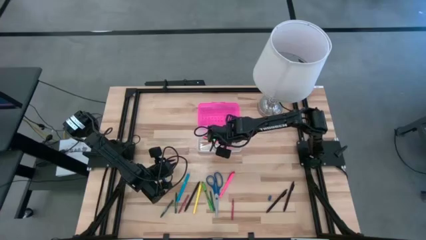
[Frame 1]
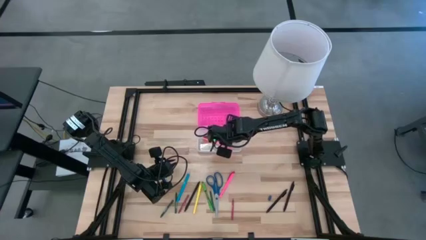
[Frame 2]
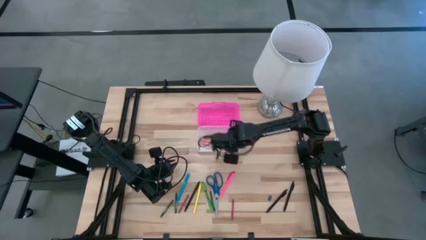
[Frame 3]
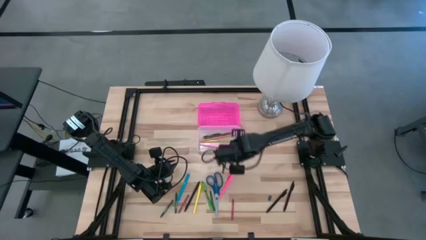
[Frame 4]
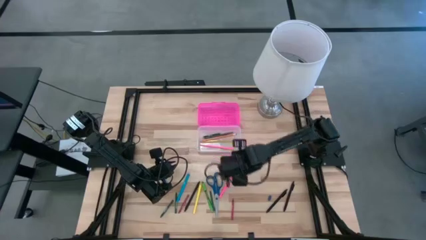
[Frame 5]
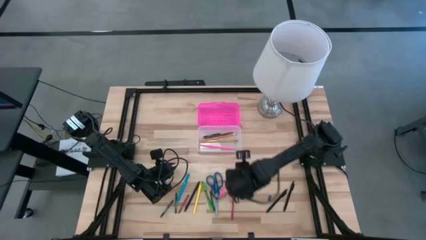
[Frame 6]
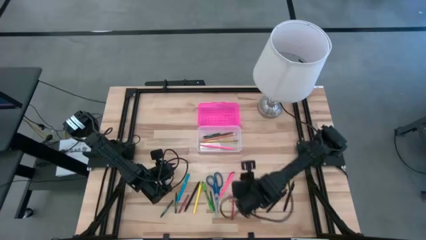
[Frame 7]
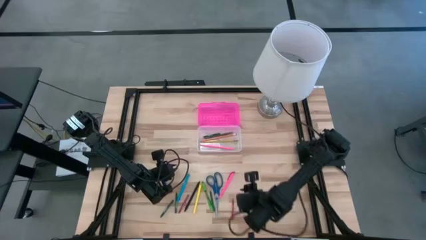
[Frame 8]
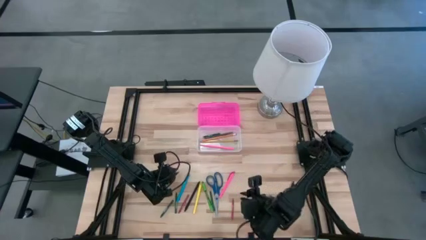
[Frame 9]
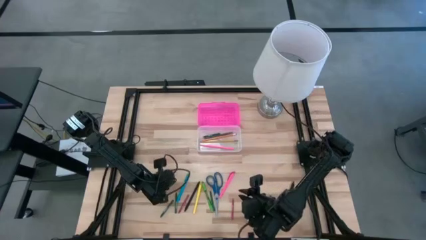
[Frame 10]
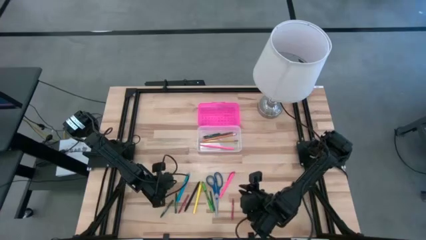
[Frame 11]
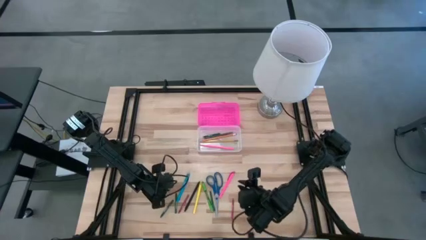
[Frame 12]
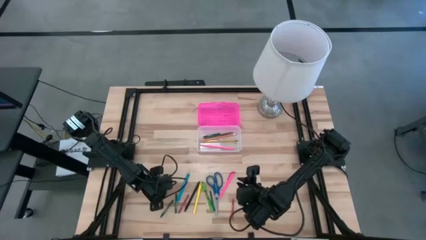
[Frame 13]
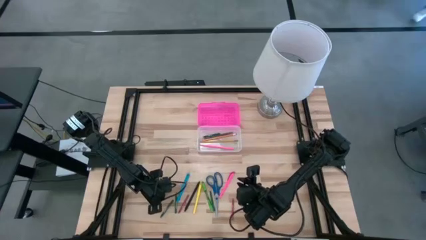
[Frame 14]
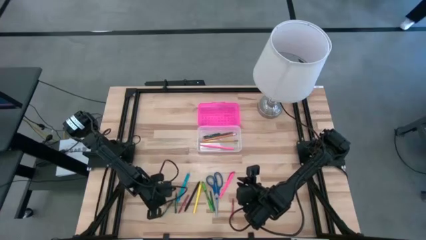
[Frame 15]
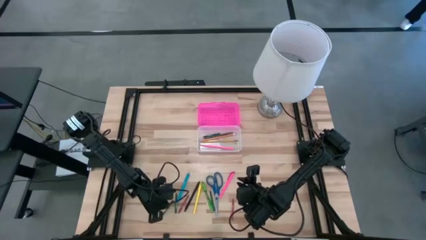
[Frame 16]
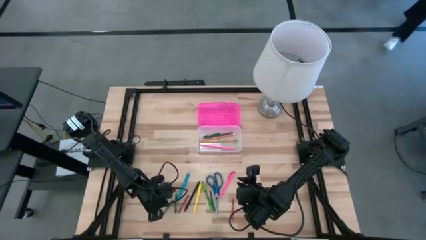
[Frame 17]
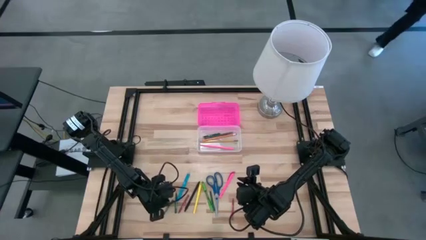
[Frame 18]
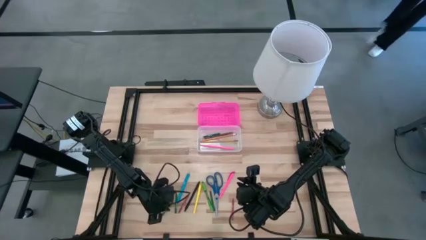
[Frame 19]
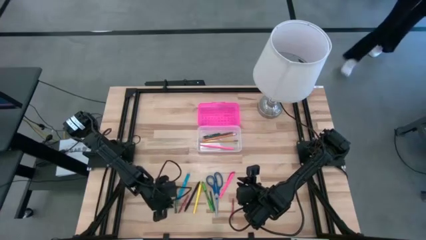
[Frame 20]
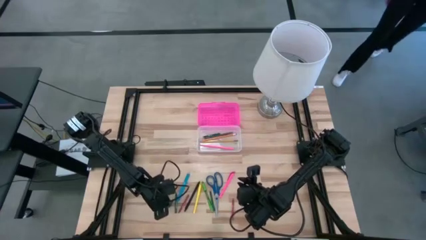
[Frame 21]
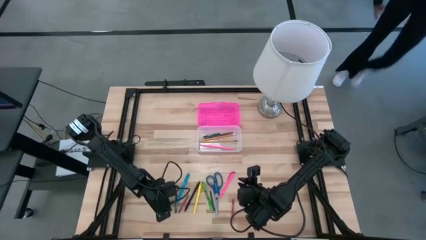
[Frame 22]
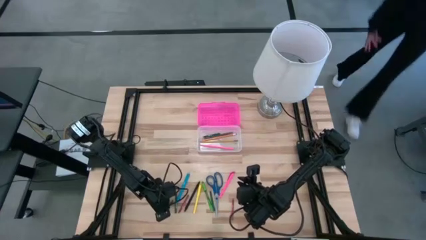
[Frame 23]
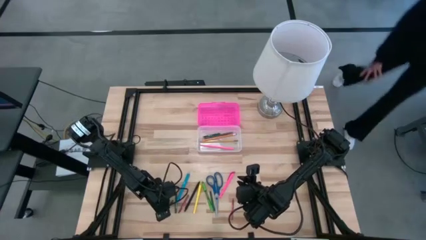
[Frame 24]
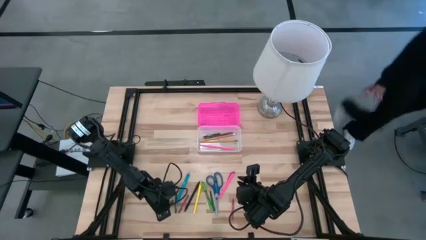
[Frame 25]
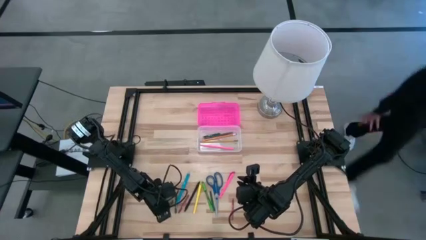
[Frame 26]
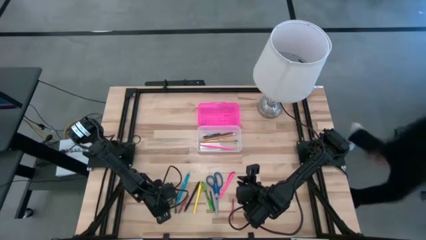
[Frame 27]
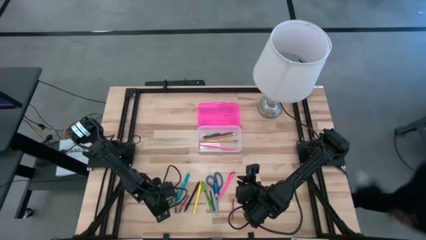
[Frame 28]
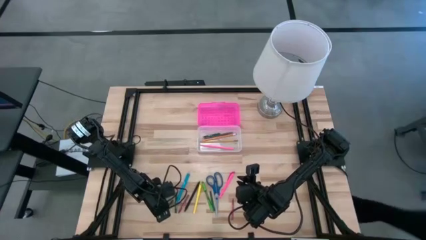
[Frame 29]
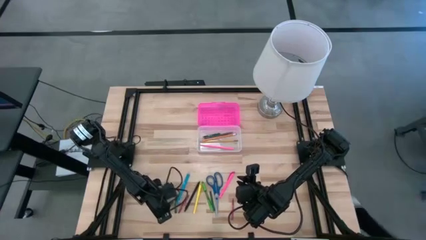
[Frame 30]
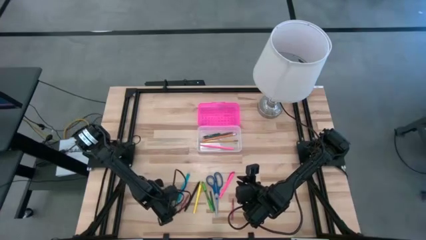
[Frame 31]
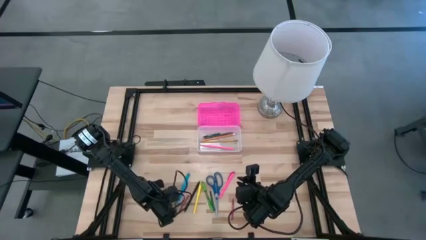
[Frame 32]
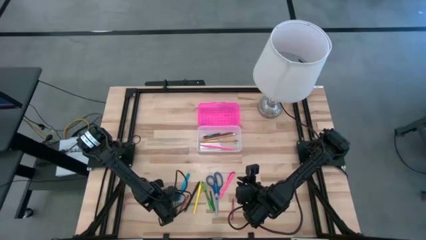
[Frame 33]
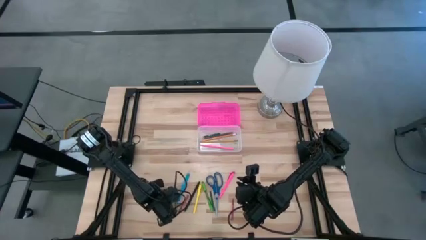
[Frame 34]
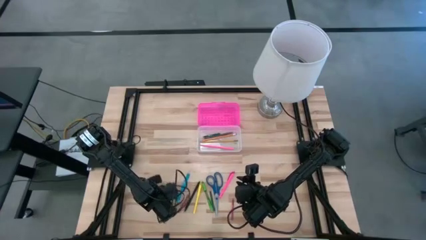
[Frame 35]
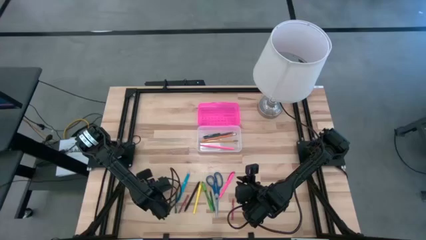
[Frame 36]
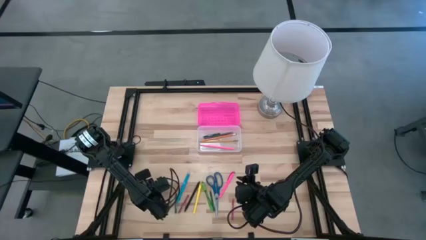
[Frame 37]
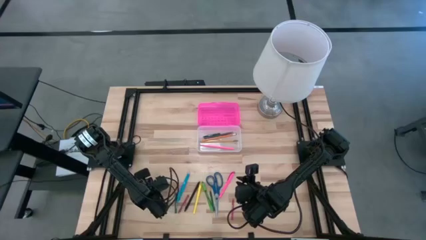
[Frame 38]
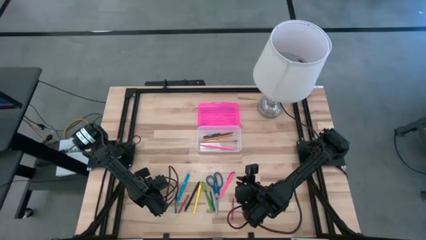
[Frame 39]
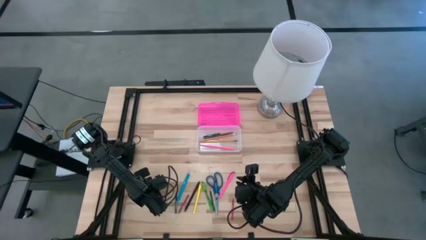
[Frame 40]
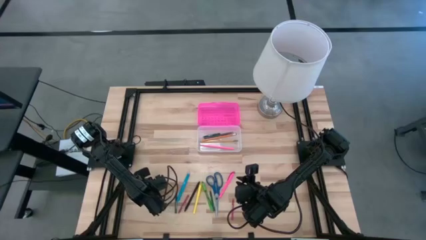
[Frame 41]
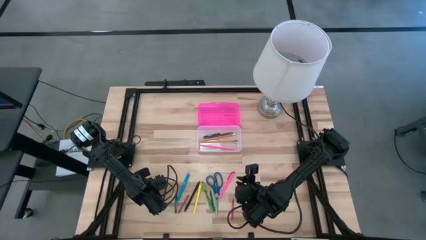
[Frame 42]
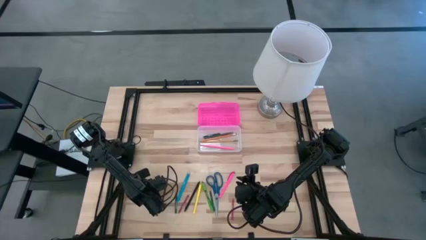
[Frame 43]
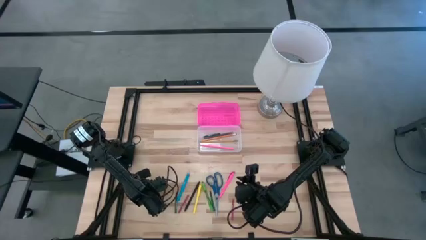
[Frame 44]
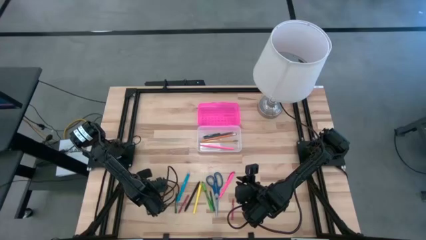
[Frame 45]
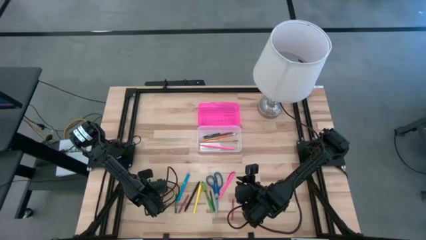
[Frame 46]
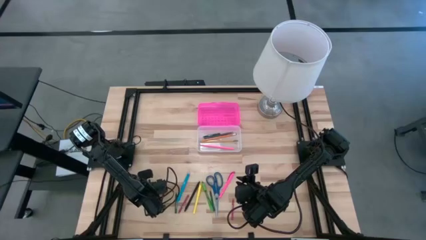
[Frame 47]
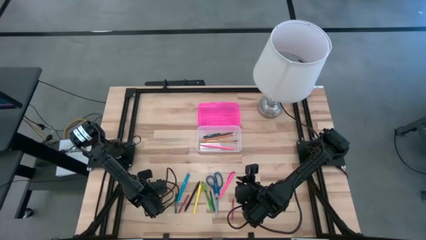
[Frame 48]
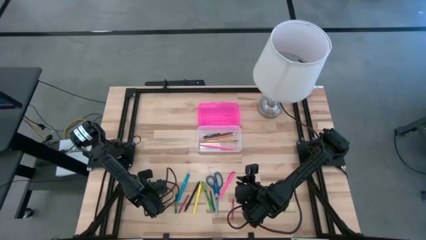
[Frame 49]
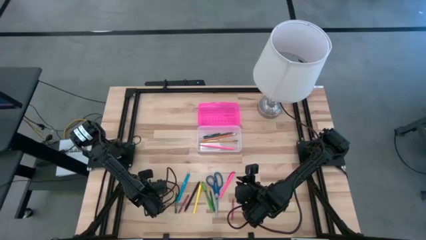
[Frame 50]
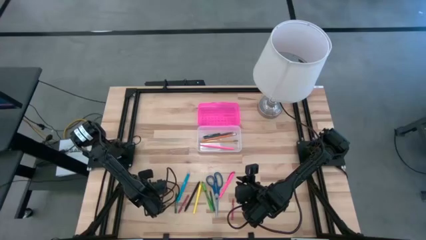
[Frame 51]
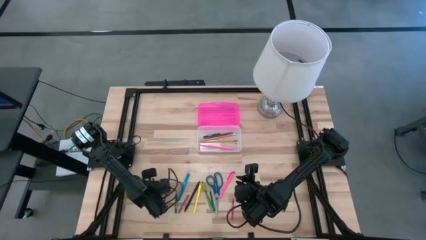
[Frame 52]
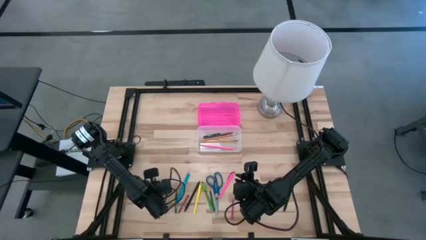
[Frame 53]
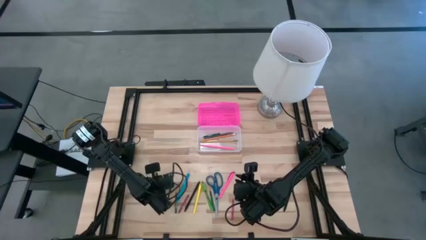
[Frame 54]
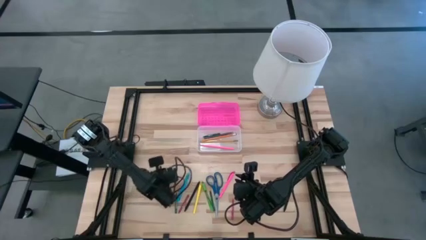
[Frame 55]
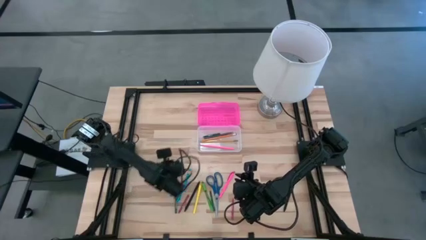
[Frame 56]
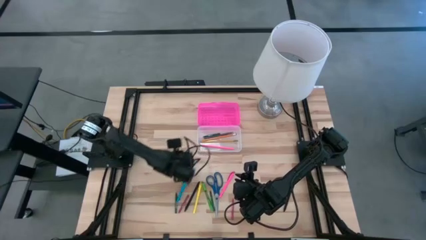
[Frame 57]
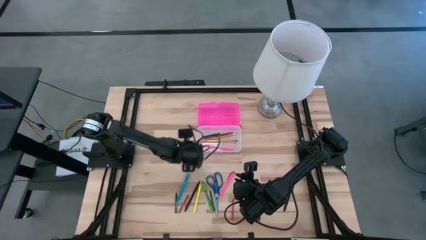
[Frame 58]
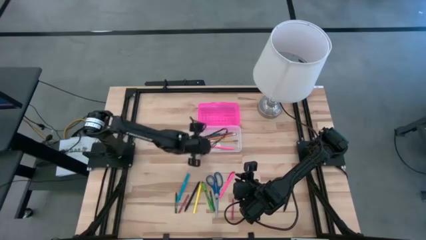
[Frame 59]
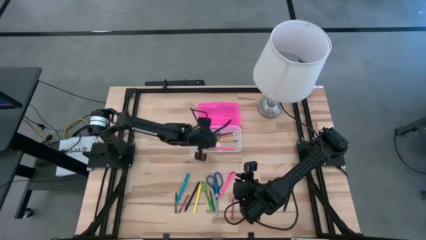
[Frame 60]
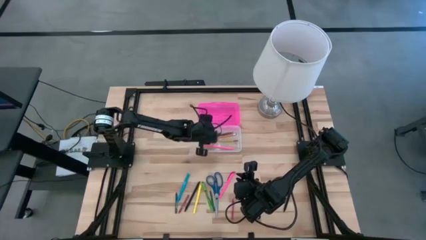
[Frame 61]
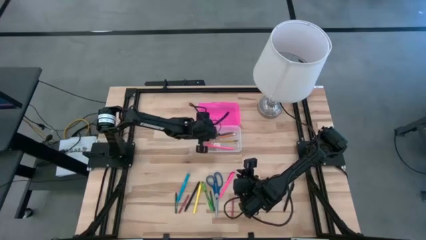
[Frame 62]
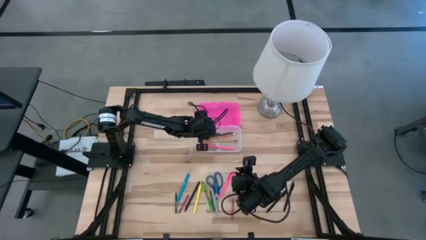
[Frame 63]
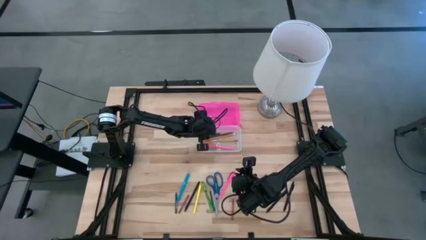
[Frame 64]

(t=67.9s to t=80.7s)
Task: Pick & place school supplies into a supply box
Put the left green crayon into the supply box

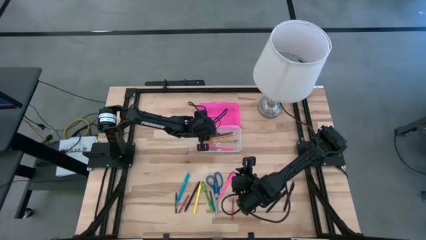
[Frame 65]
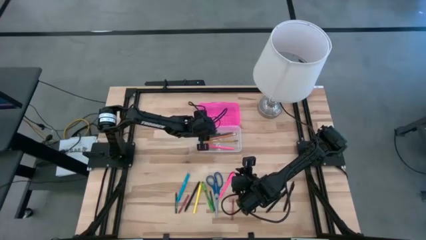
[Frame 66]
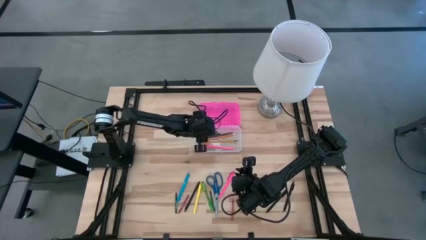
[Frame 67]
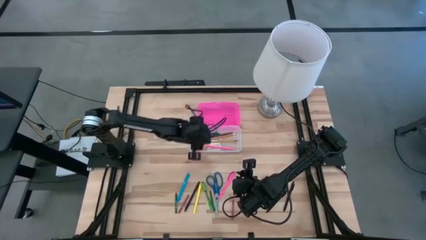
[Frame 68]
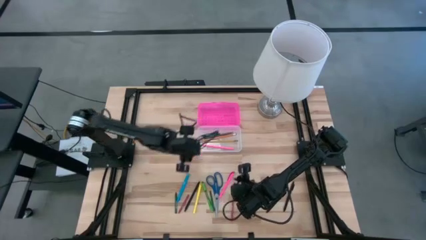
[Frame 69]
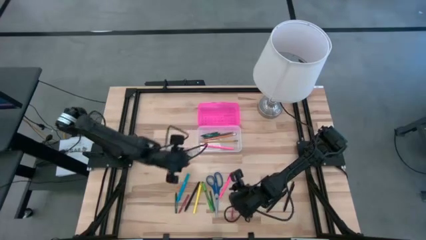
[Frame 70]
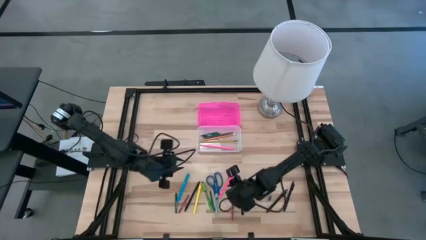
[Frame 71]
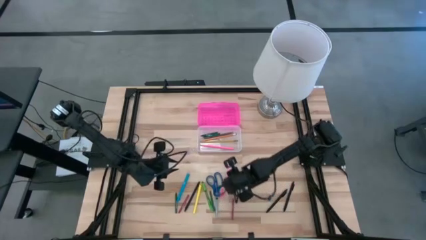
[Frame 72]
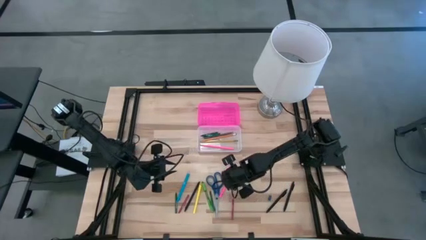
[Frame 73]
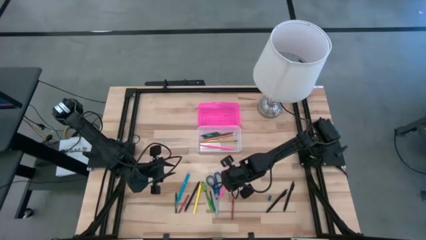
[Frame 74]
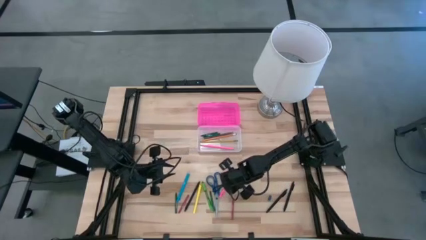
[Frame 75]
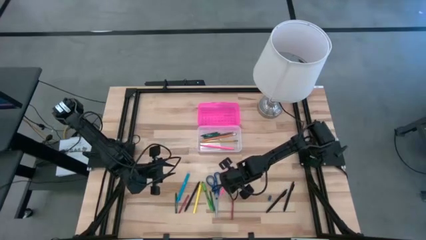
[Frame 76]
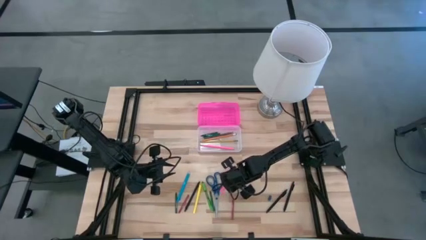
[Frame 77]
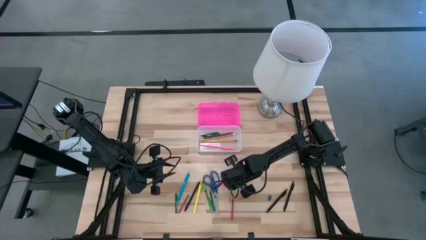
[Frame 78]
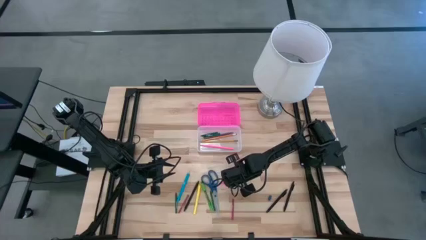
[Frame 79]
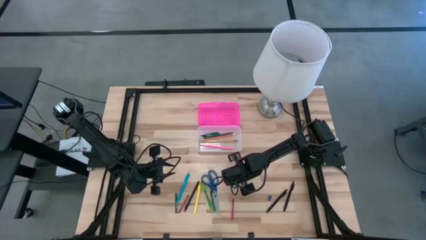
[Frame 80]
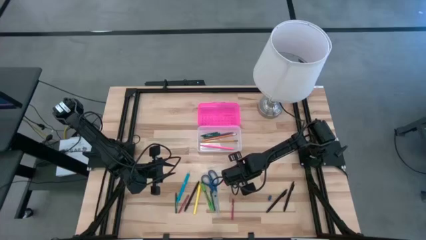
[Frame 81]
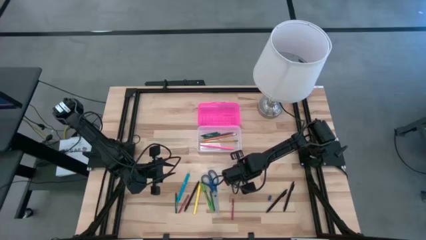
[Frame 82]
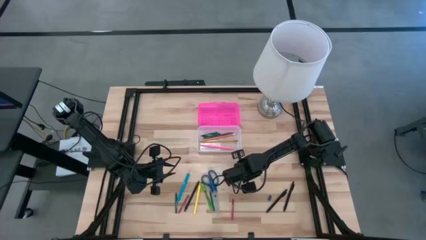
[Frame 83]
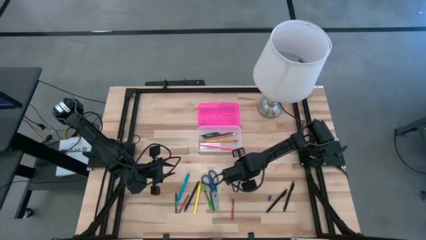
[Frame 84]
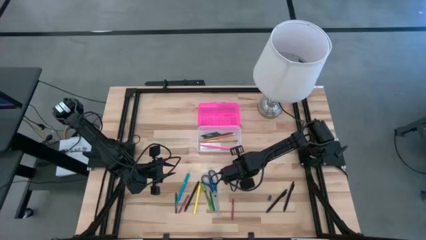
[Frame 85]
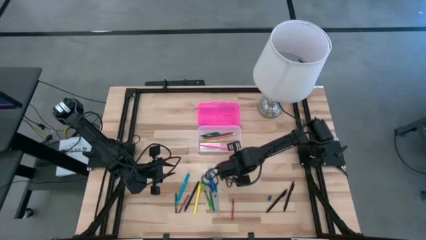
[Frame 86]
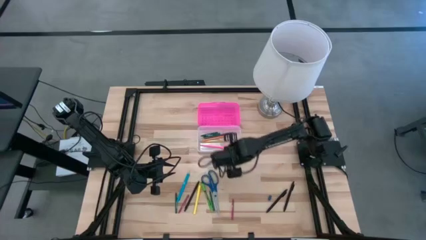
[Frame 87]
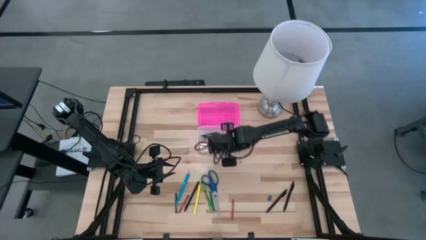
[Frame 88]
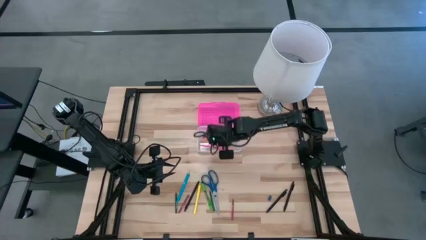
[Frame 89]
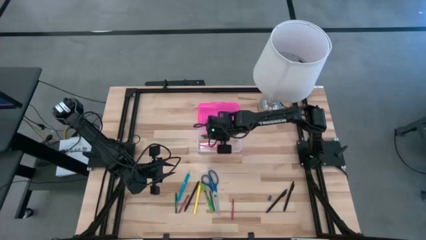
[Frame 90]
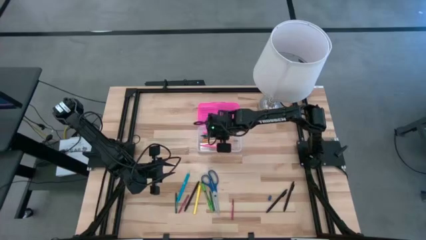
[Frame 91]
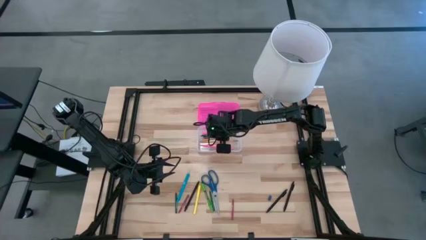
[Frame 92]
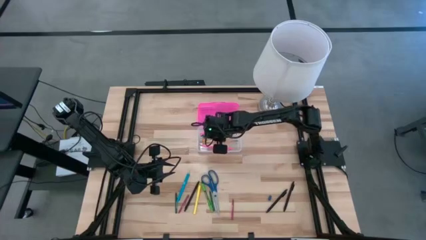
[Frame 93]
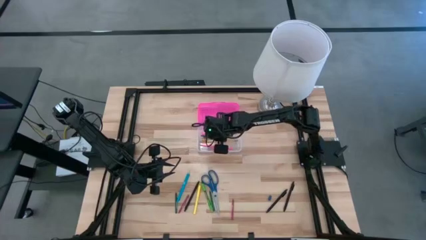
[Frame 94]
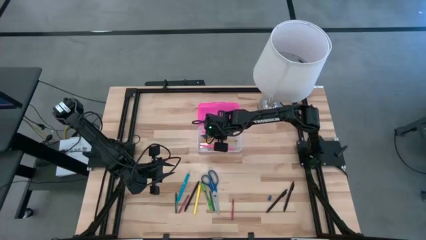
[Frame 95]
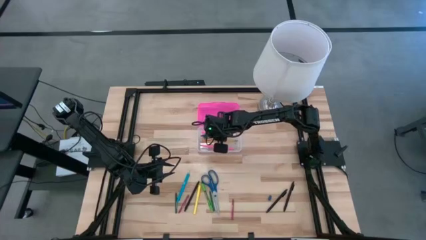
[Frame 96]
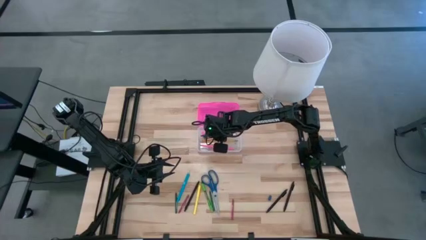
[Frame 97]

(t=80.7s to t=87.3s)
Put the pink highlighter pen into the supply box
